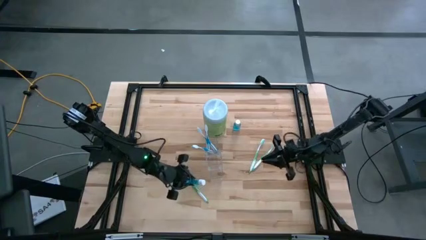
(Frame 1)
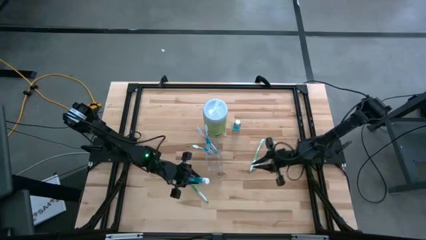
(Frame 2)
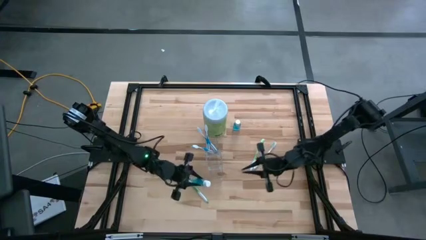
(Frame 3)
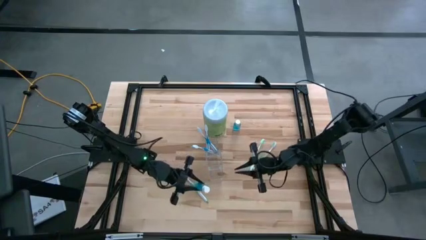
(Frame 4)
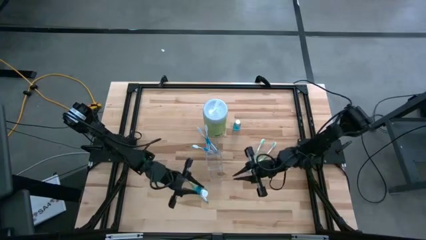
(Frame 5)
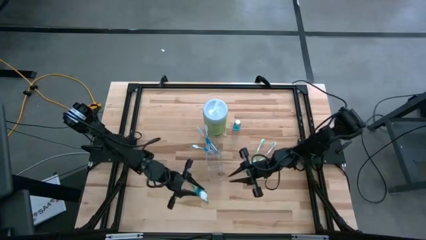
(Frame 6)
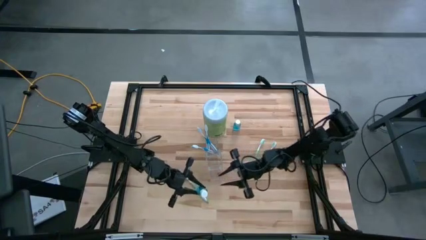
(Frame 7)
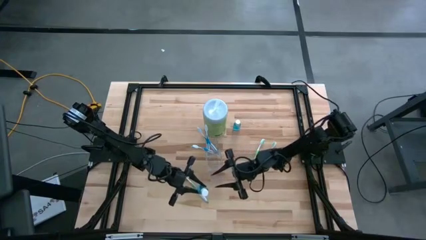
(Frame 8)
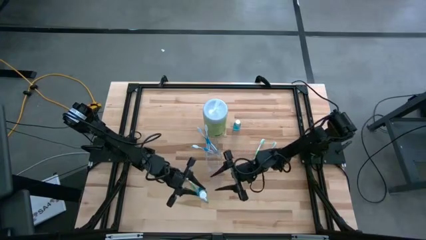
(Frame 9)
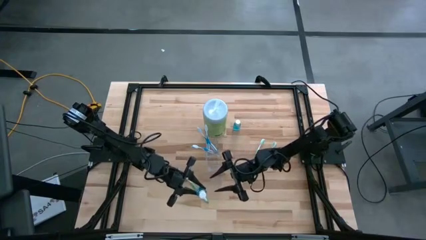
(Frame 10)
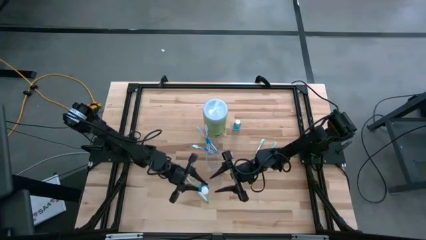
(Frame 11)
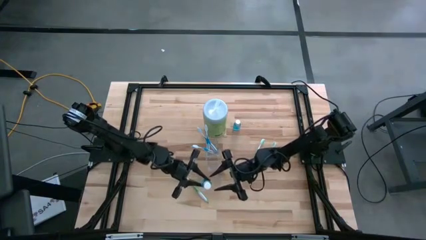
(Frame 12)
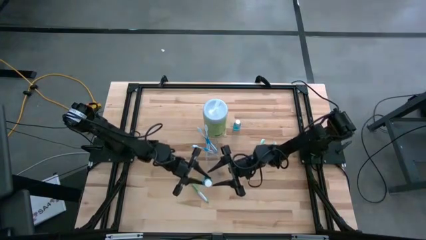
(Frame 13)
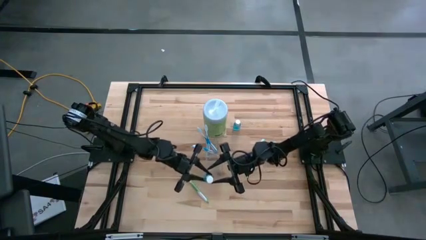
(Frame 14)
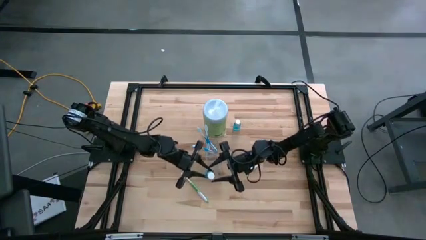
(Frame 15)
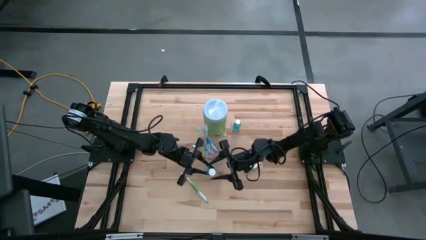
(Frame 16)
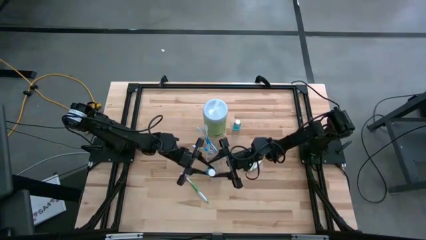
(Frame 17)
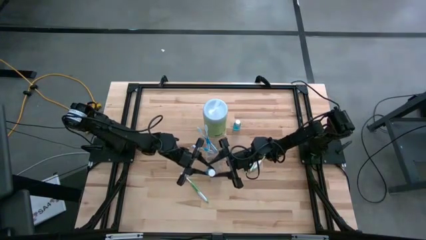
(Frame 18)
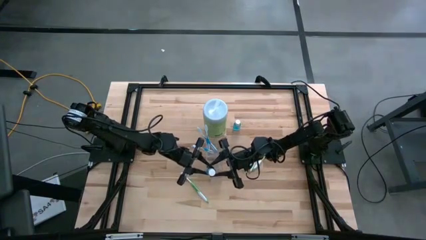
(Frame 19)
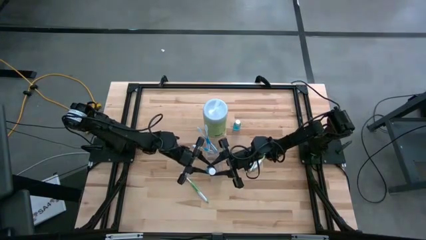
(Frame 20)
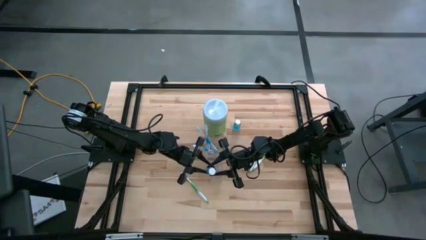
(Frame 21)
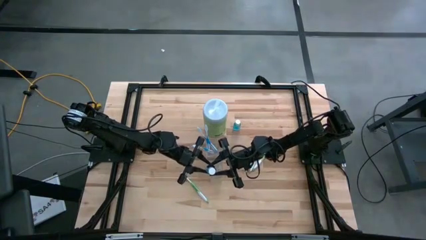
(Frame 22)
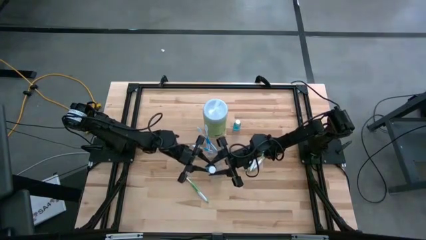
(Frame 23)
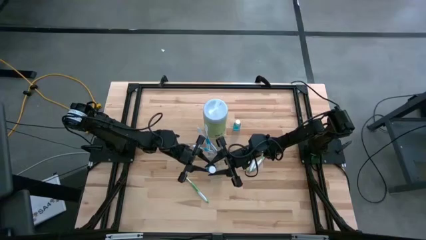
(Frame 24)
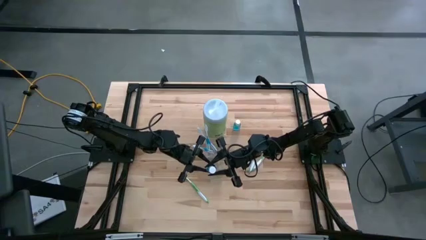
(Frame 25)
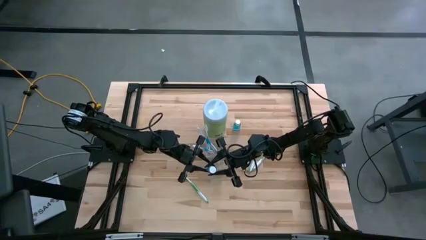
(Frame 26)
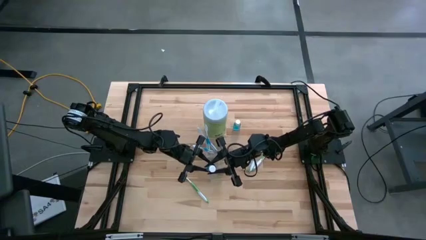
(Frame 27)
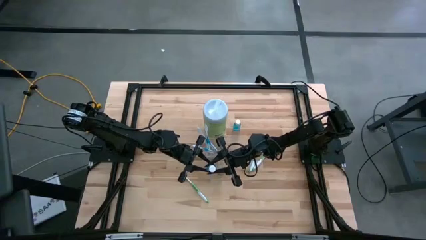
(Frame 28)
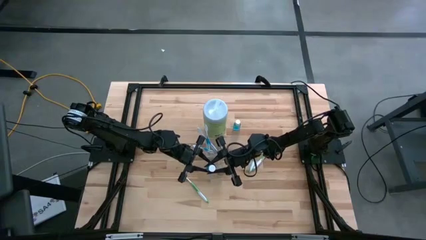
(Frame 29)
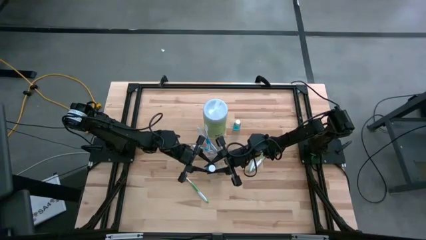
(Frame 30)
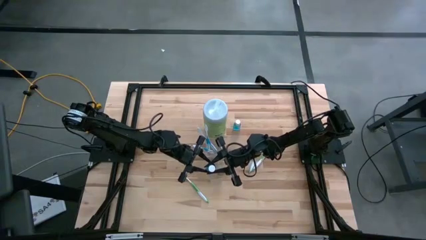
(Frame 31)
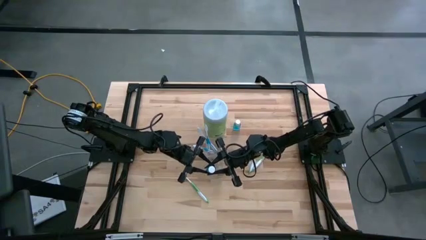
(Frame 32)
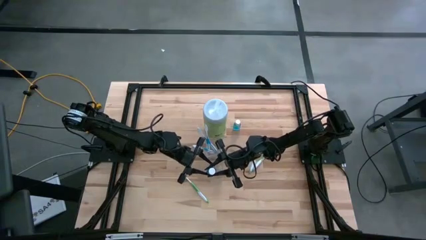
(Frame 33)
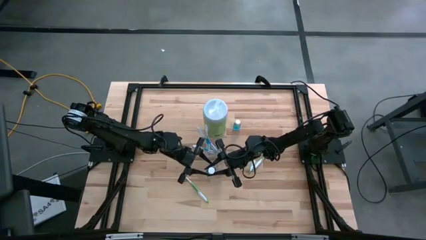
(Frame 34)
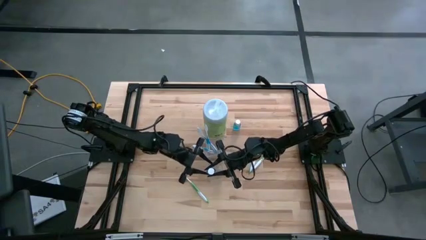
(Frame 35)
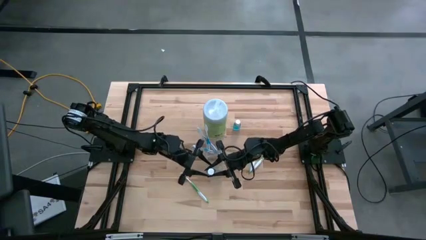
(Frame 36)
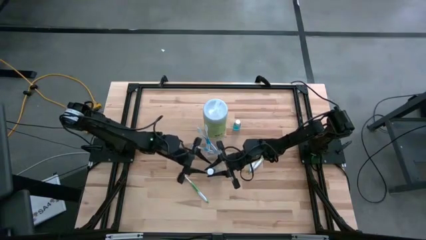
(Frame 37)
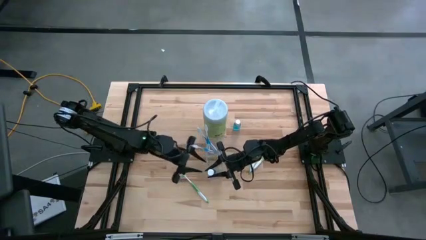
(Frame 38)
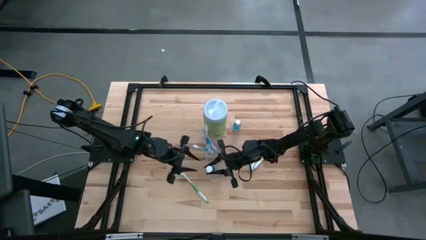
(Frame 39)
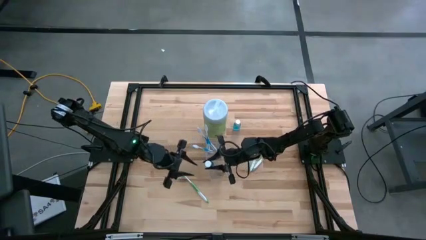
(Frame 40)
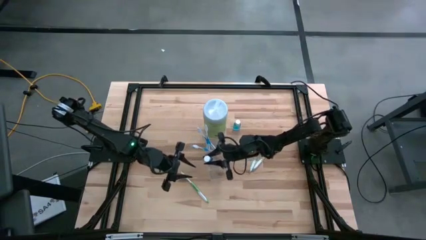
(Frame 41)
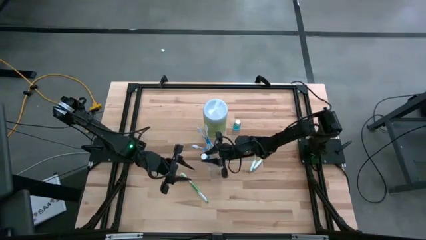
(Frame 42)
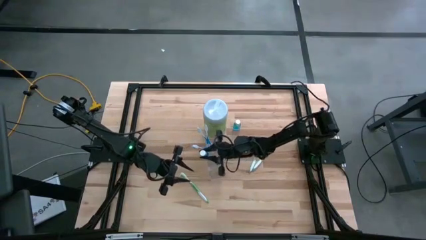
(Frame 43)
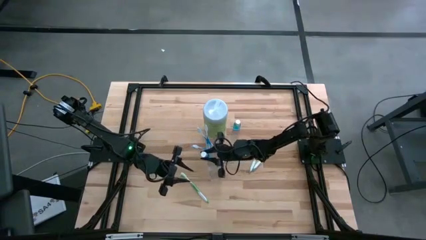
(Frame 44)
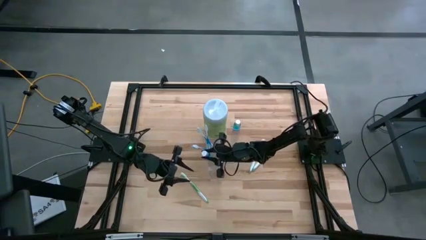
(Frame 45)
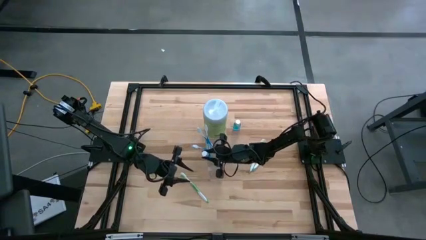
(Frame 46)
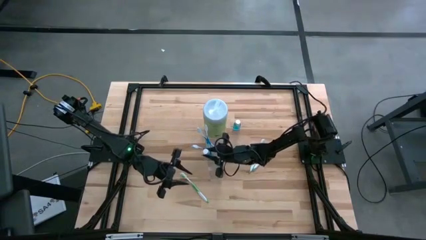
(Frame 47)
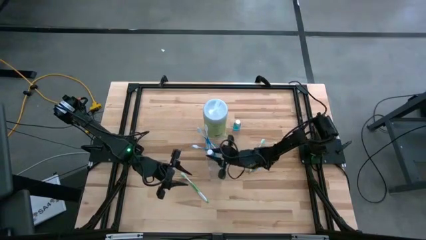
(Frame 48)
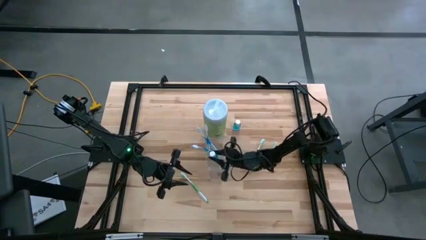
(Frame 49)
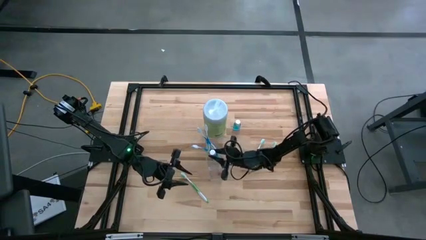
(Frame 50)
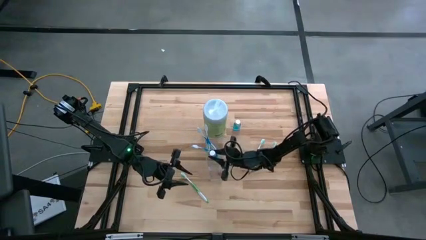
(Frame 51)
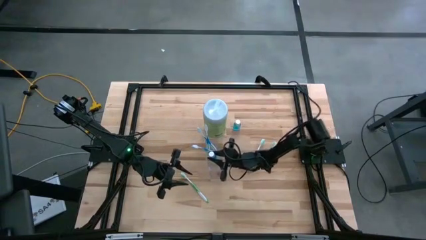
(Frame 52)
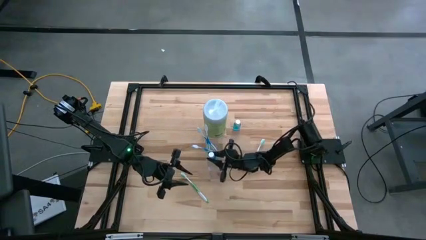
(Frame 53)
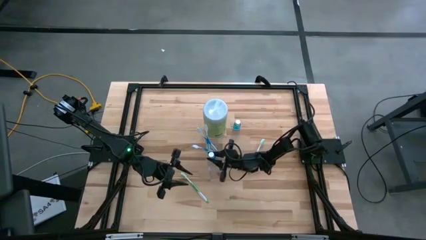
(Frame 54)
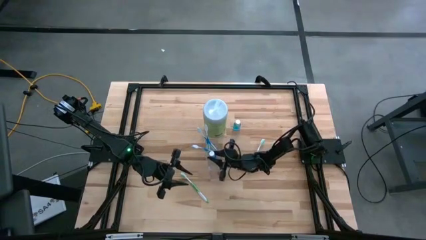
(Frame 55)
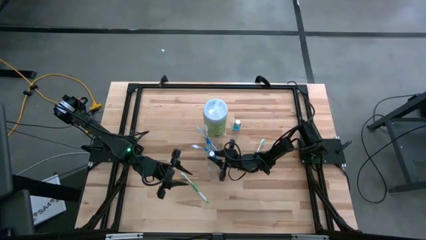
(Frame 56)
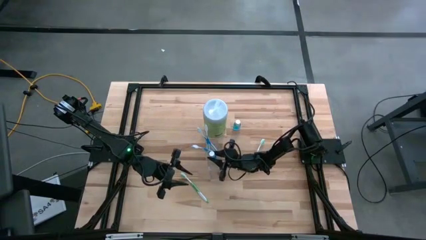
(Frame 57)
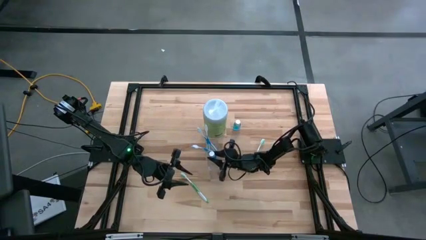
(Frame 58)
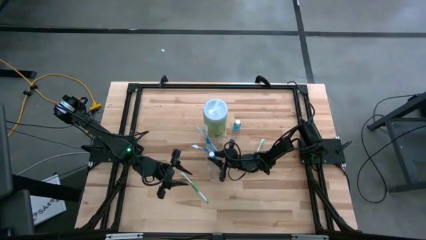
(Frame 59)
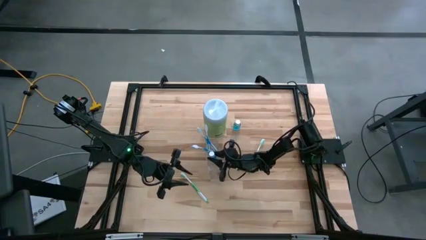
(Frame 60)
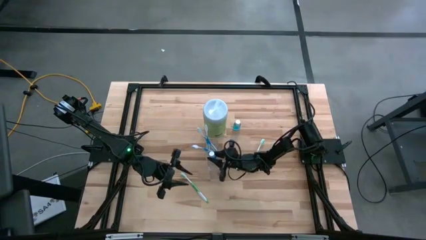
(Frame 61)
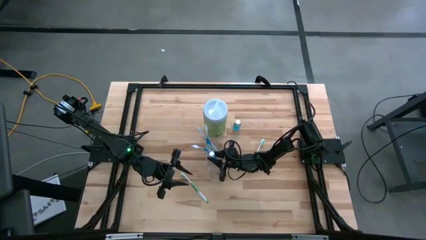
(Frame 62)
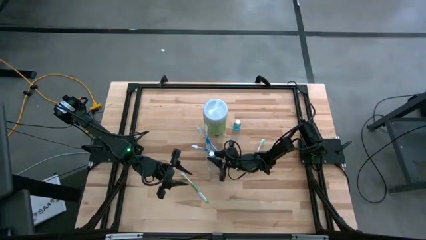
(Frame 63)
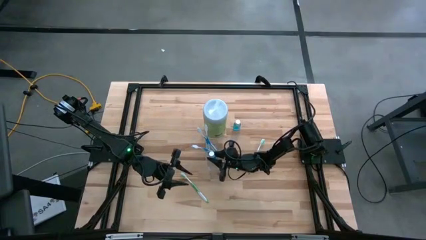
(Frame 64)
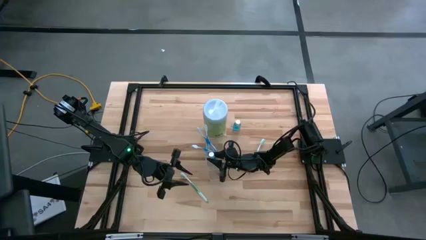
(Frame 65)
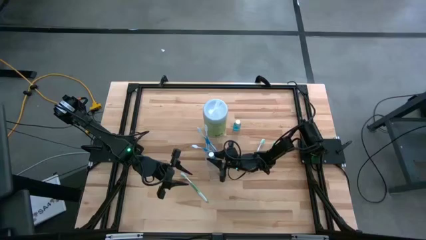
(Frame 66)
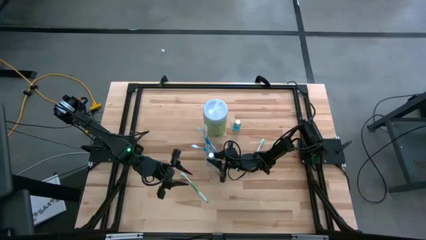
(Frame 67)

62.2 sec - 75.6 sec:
Task: Pick & Place toothbrushing station
Put the bottom mouthwash into the transparent organizer
